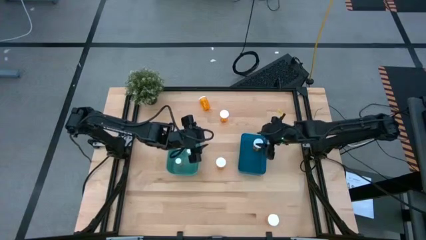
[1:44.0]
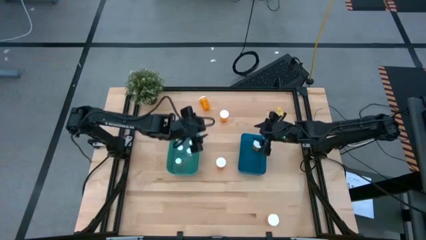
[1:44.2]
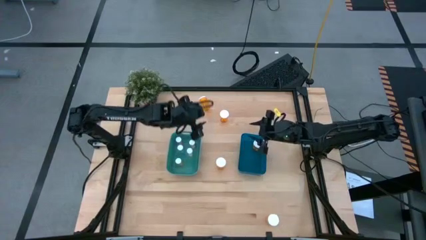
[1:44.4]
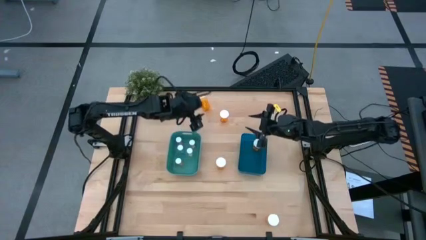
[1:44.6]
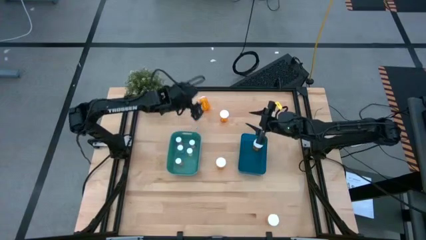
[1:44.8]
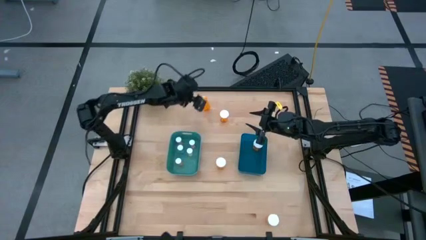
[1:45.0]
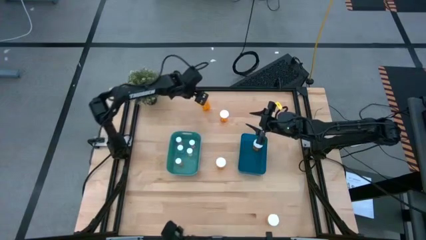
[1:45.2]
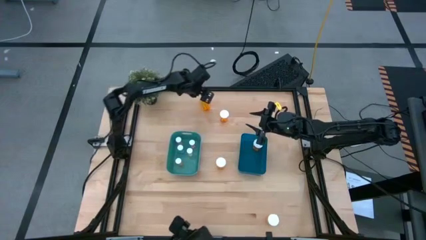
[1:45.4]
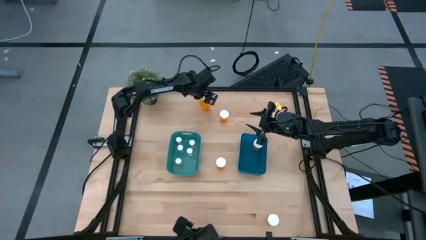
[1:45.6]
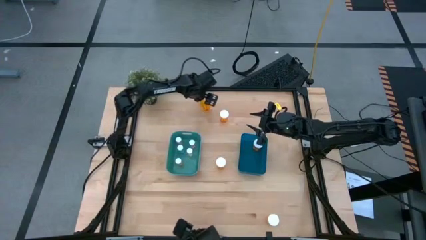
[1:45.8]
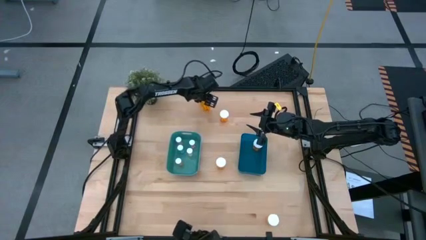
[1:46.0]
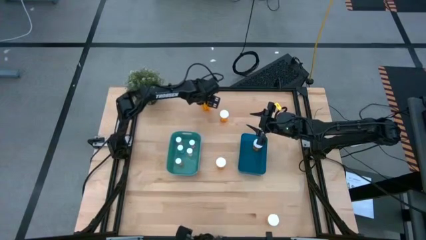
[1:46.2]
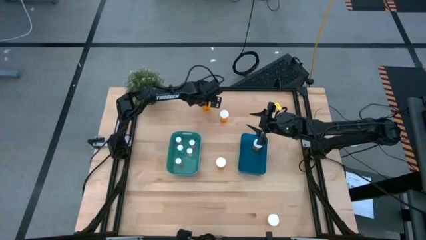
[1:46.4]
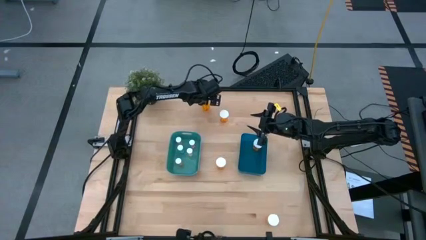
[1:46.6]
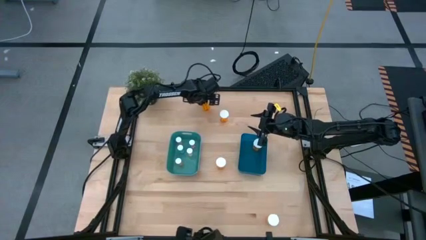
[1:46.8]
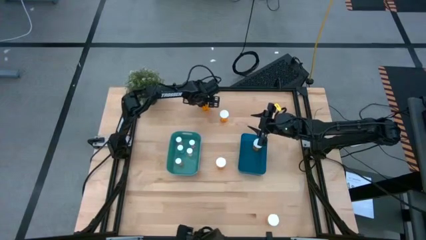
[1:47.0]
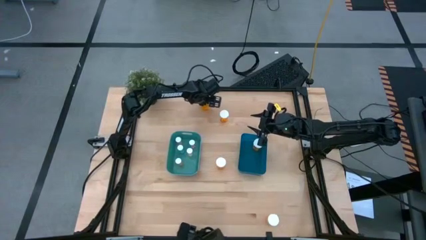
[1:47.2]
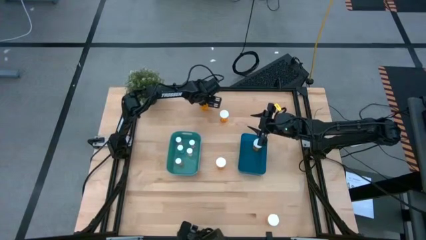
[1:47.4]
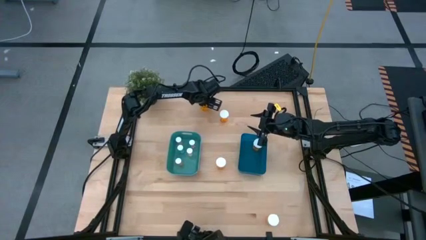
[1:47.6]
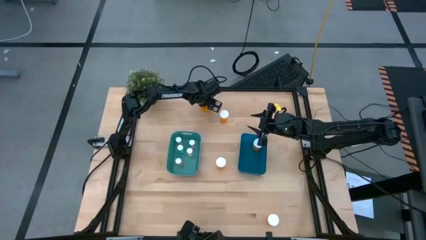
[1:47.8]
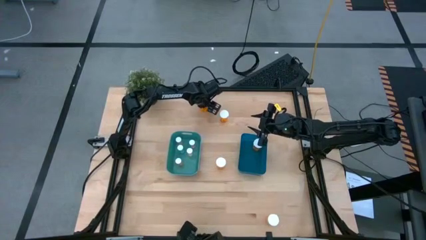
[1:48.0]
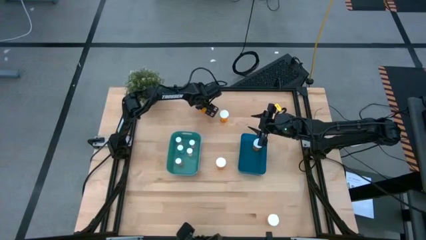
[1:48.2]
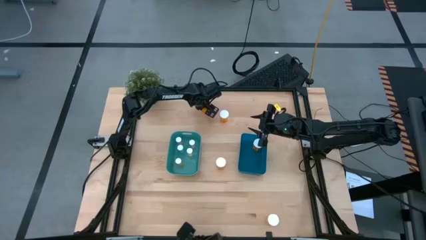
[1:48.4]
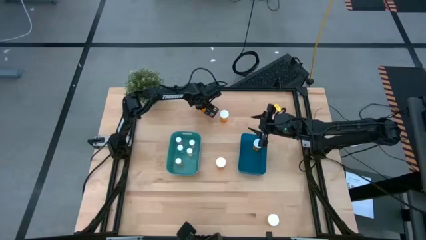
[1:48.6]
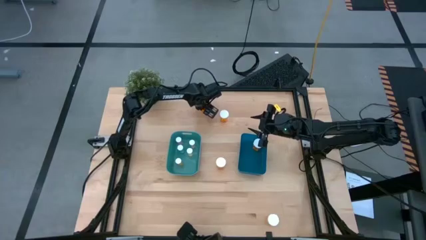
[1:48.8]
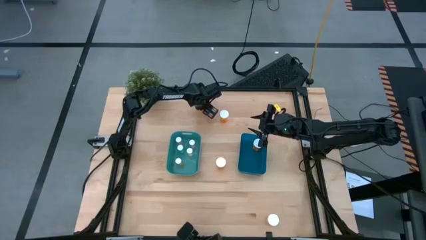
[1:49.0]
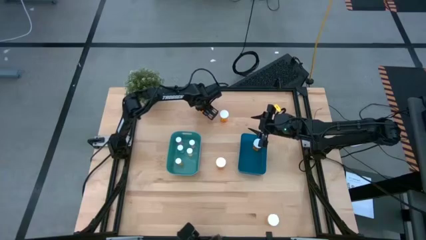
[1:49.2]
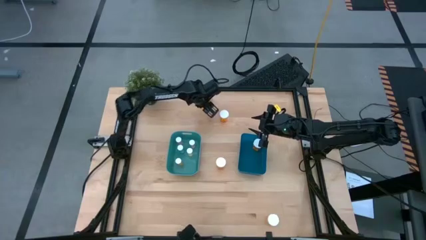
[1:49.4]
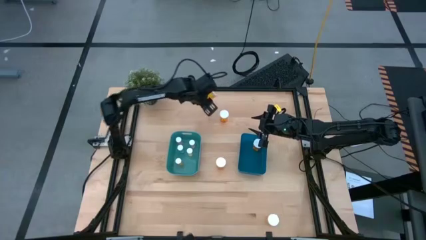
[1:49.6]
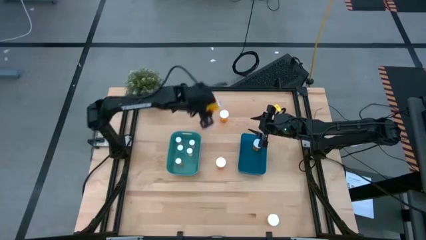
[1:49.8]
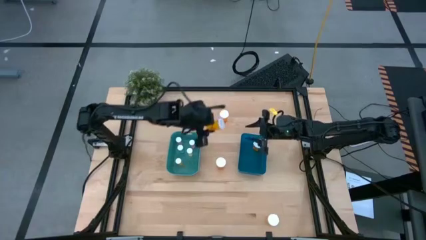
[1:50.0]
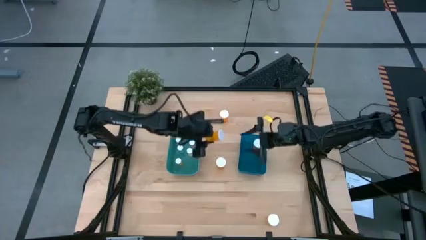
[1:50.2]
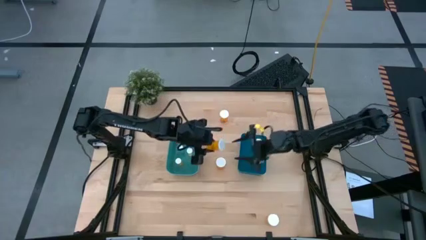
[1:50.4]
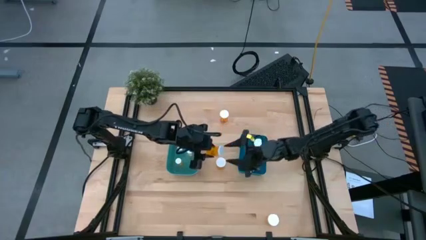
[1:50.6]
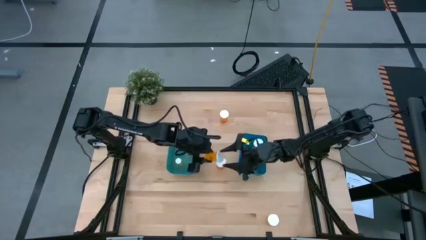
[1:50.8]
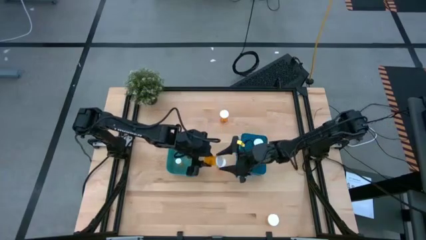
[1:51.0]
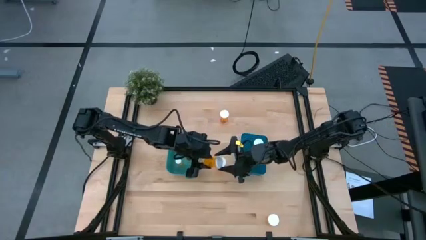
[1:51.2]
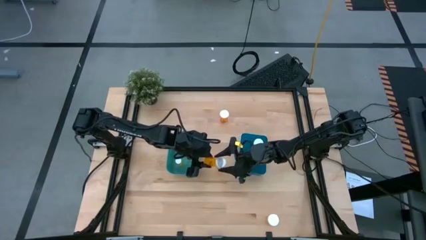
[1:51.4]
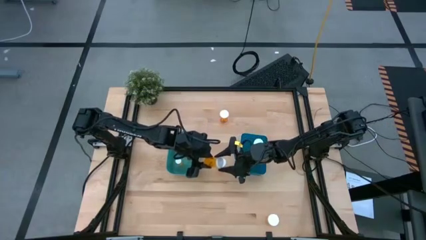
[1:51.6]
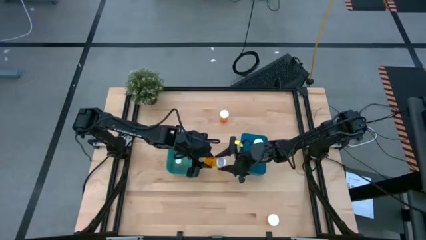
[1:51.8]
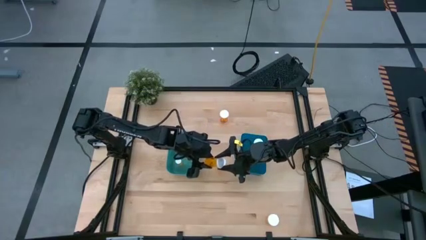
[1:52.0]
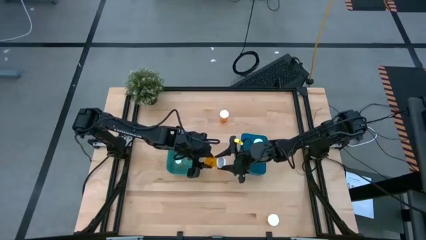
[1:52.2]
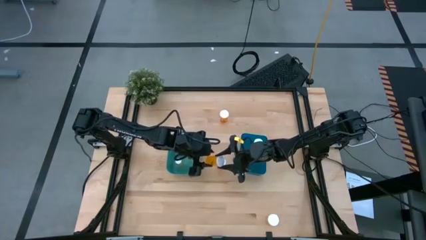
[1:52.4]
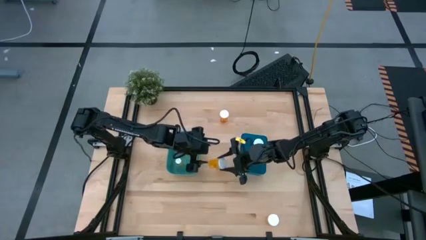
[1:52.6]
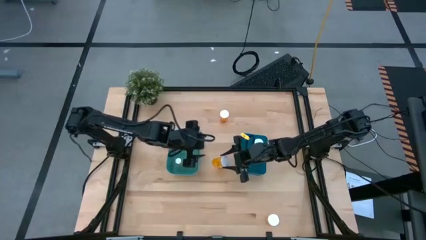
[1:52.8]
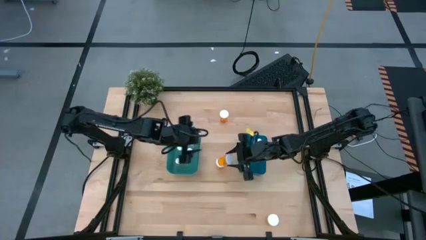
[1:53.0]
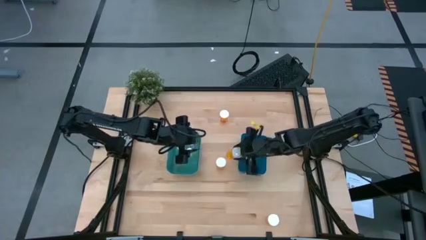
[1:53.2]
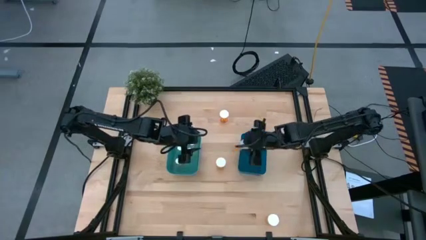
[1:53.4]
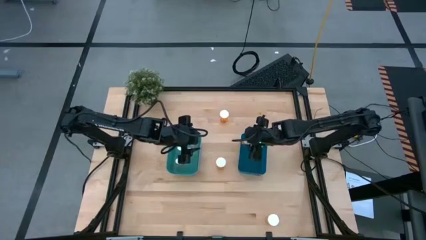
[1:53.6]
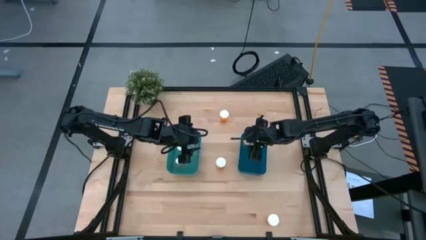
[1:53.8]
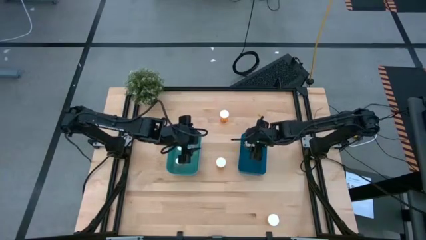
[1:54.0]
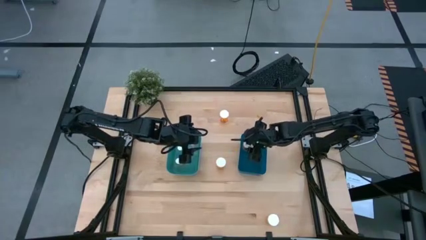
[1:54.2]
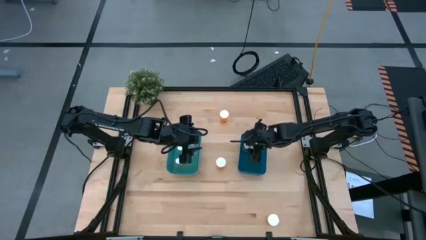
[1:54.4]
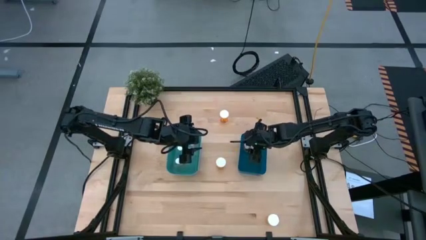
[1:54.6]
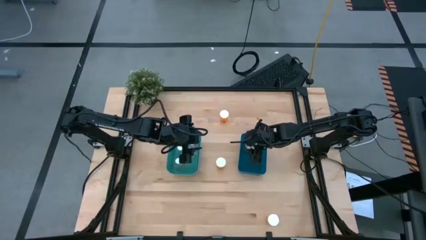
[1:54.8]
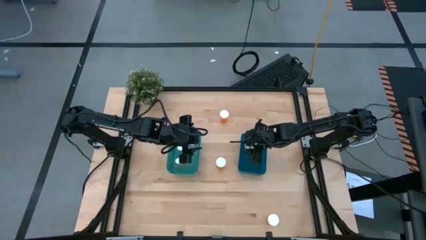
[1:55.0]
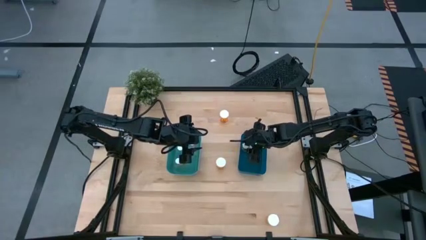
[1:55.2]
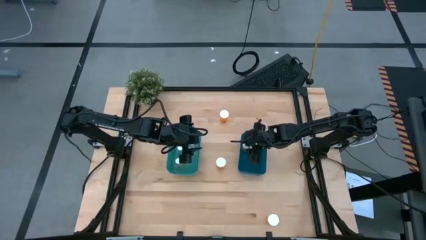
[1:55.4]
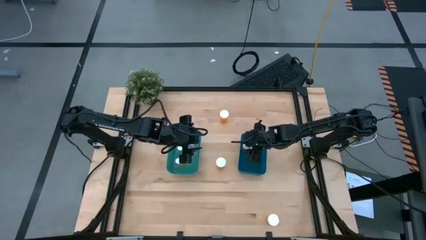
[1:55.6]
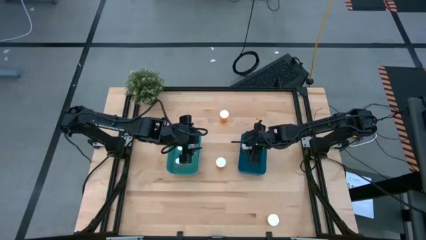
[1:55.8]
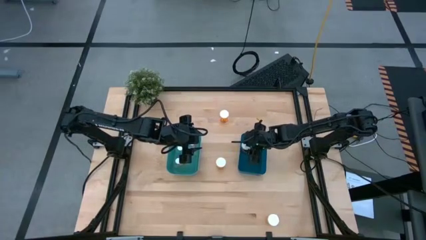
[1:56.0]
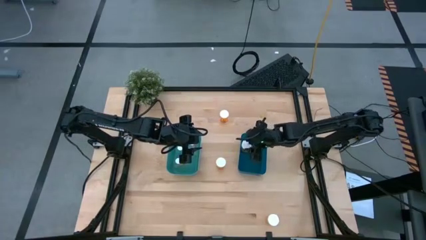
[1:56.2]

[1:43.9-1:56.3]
Task: Pick and place medicine bottles into bin by pill shape (circle, oval)
Put the large orange pill bottle into the blue bin

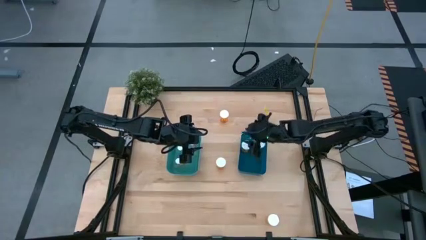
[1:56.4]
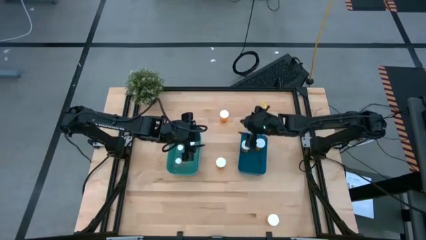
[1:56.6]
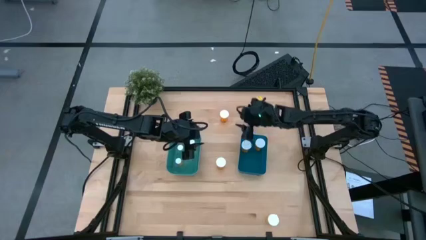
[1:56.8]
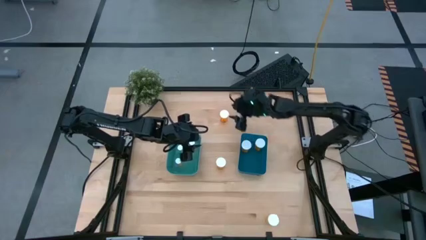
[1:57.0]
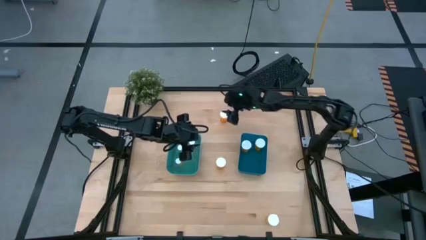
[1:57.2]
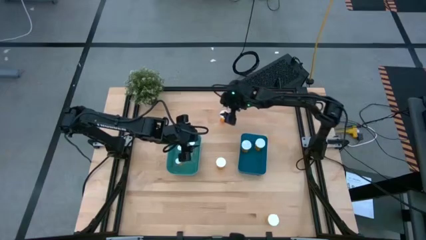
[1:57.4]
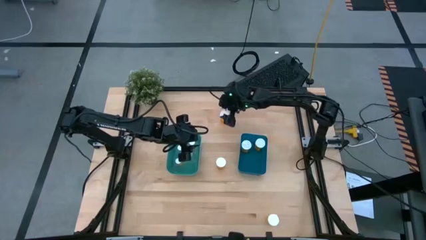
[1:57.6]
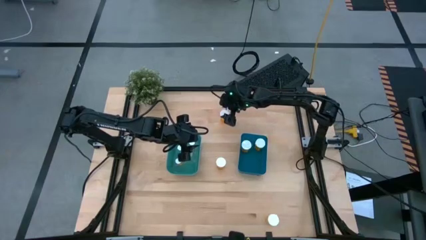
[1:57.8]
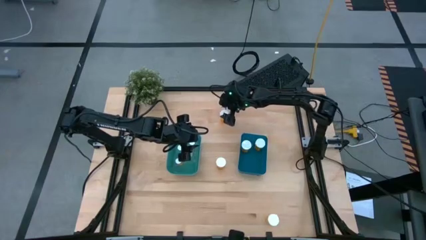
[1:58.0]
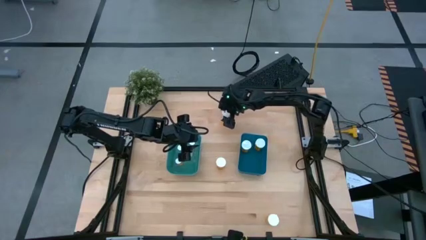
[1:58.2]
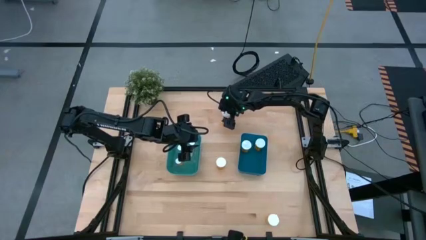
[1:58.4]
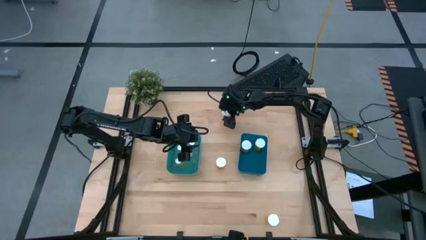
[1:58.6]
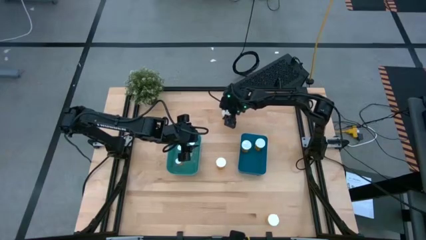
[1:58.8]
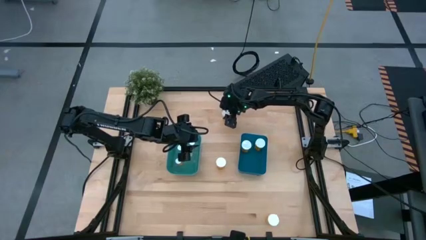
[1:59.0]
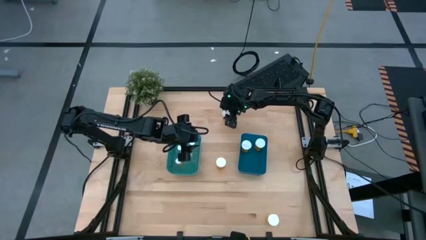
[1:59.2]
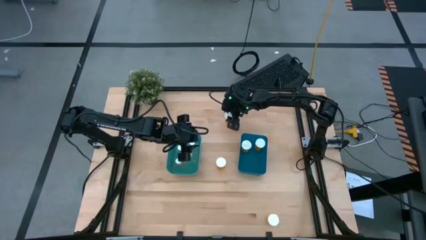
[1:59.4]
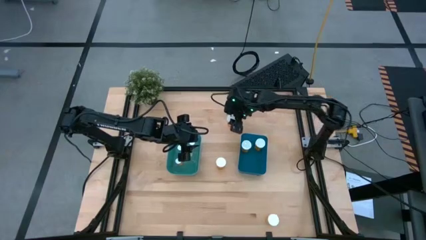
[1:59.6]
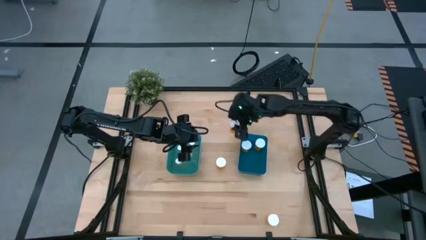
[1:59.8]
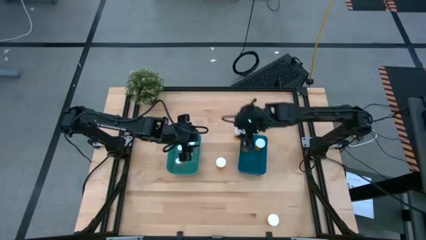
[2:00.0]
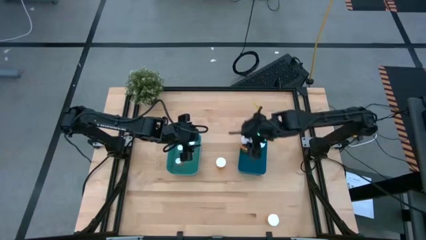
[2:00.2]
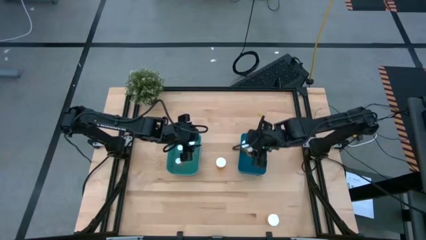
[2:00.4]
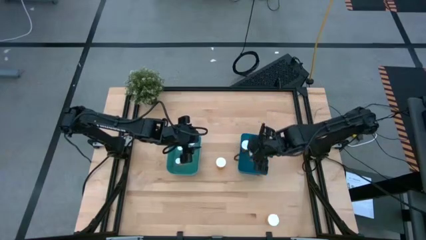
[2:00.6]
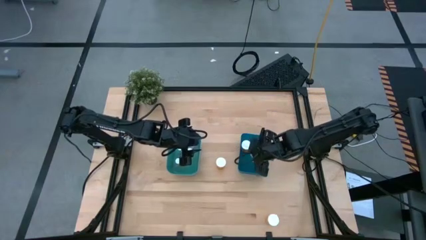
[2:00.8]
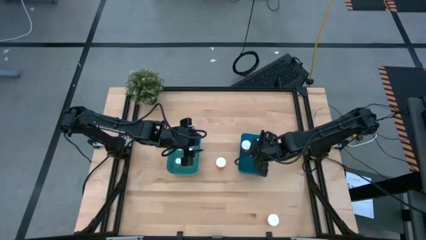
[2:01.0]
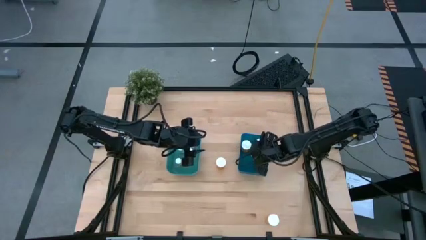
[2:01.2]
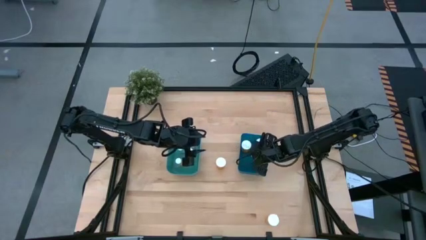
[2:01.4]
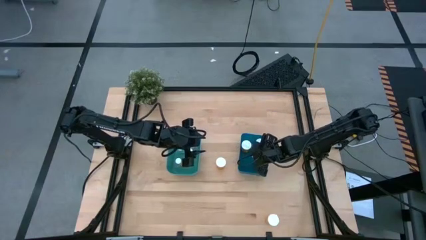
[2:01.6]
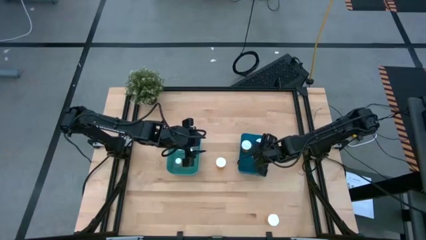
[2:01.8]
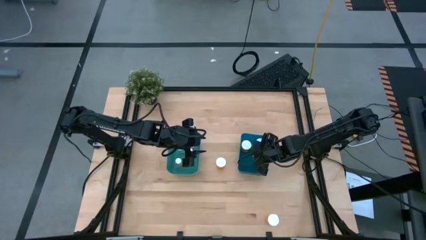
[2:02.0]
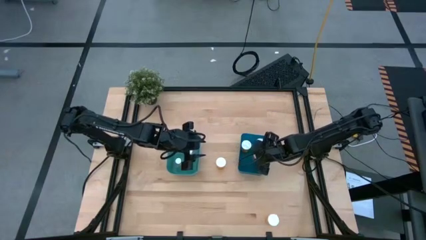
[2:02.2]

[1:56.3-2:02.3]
Put the large orange pill bottle into the blue bin
